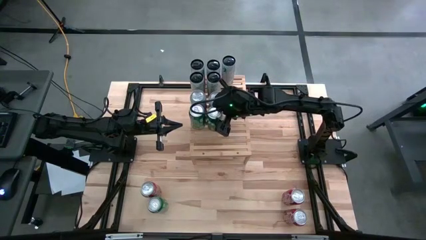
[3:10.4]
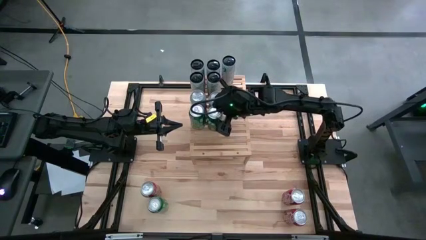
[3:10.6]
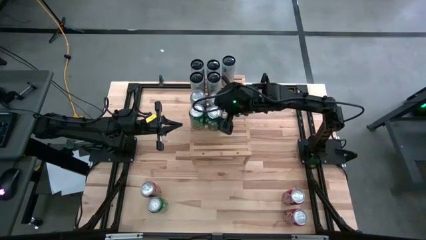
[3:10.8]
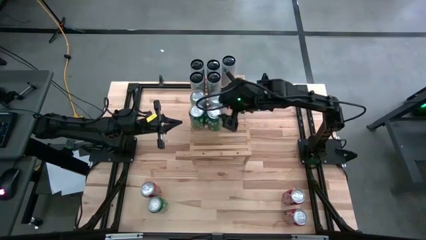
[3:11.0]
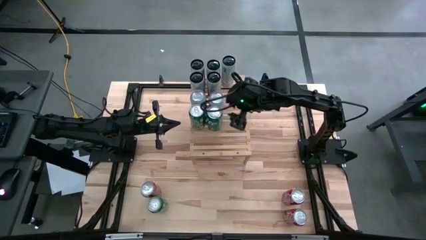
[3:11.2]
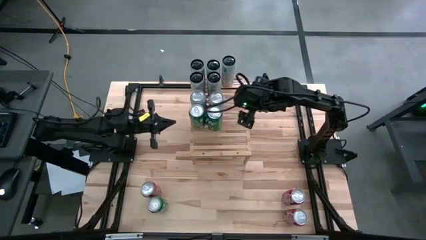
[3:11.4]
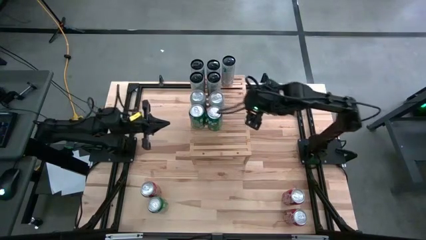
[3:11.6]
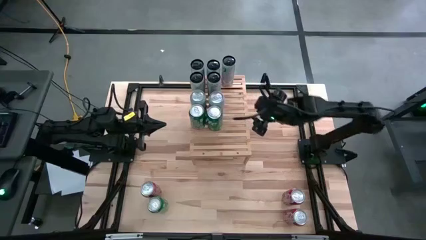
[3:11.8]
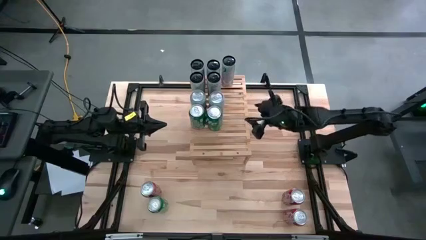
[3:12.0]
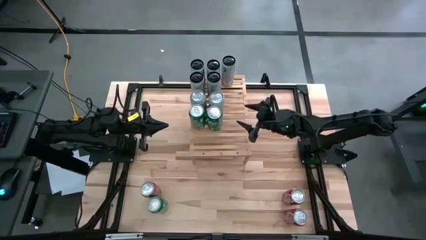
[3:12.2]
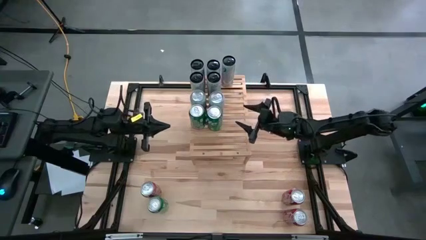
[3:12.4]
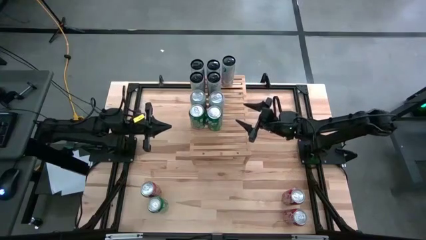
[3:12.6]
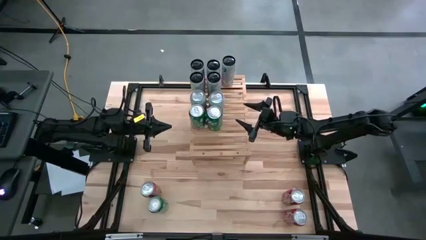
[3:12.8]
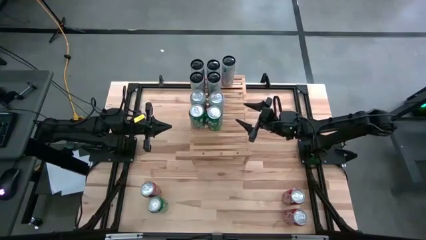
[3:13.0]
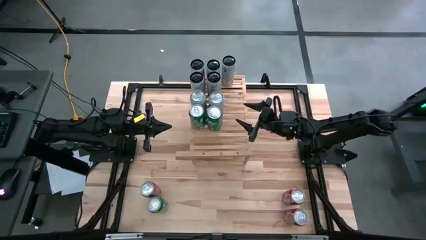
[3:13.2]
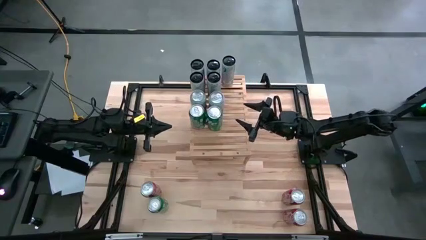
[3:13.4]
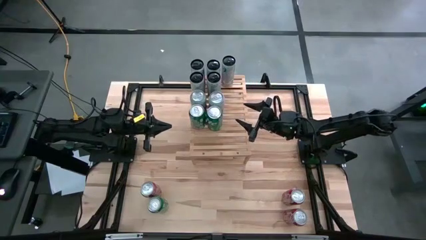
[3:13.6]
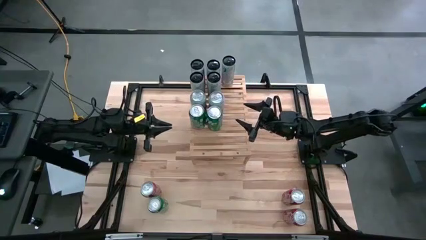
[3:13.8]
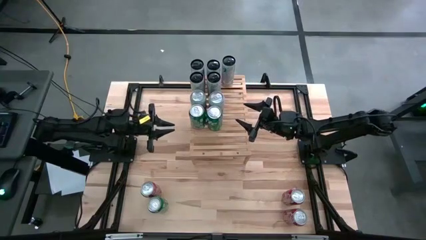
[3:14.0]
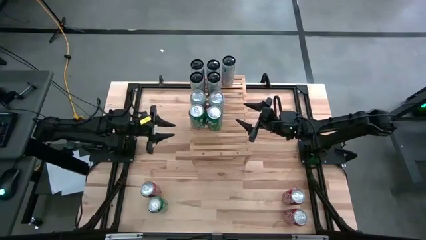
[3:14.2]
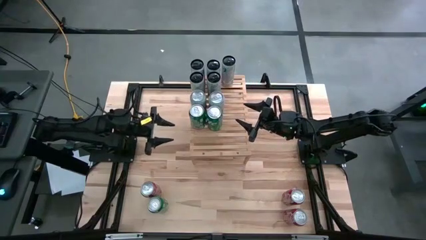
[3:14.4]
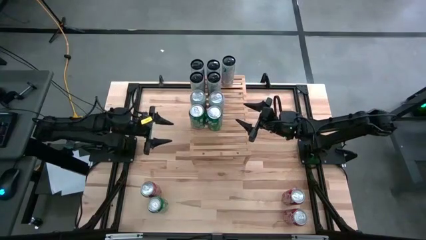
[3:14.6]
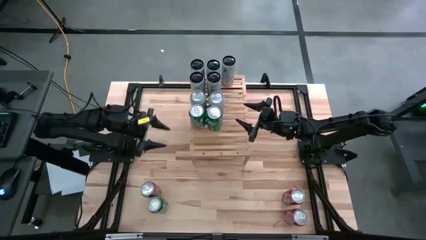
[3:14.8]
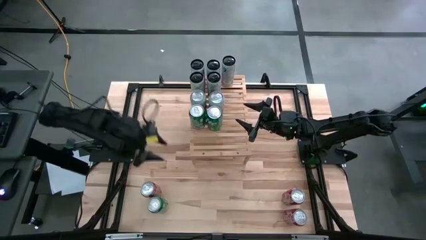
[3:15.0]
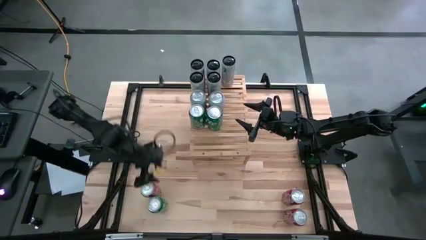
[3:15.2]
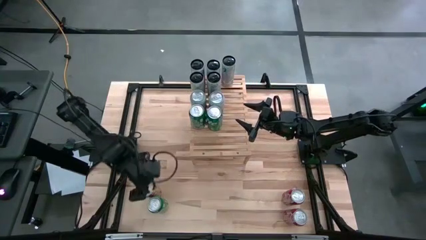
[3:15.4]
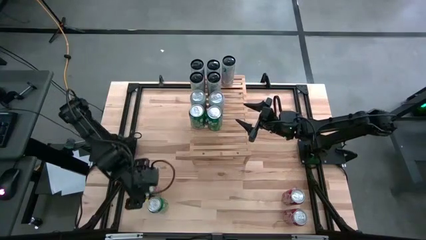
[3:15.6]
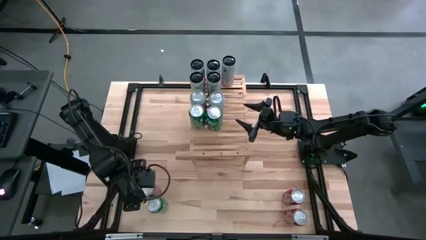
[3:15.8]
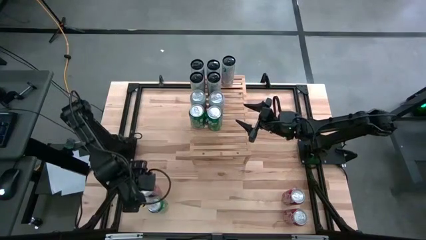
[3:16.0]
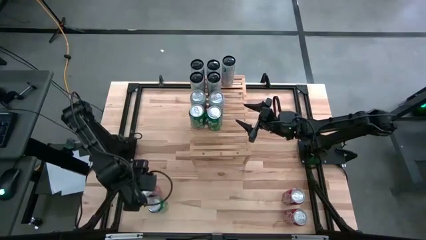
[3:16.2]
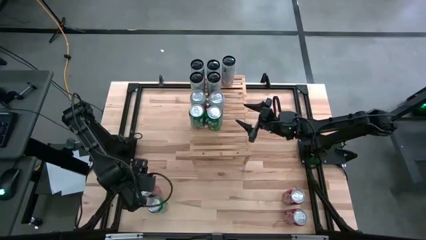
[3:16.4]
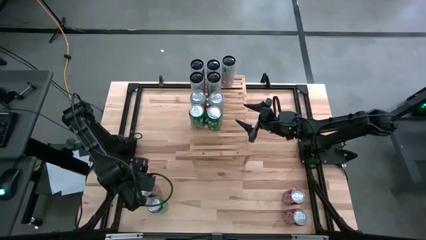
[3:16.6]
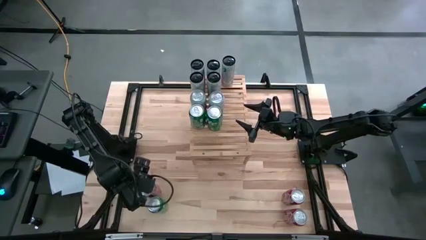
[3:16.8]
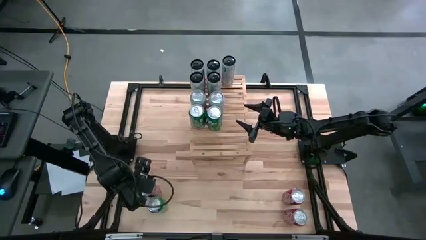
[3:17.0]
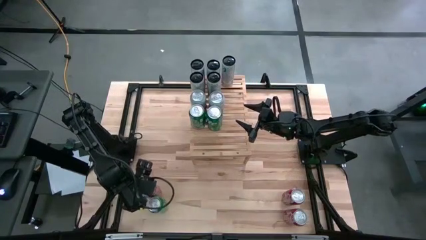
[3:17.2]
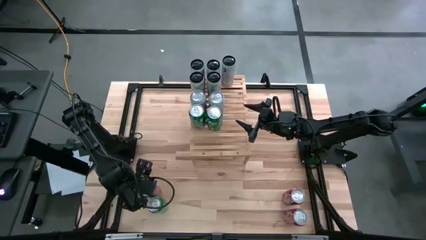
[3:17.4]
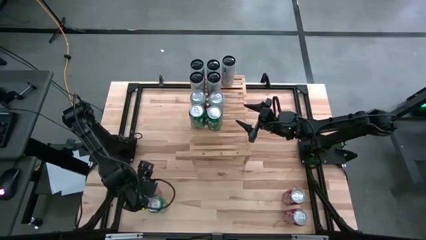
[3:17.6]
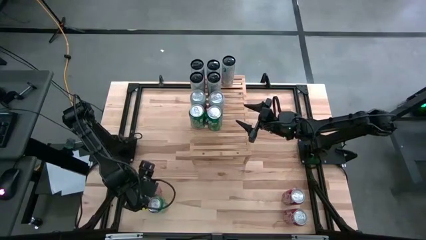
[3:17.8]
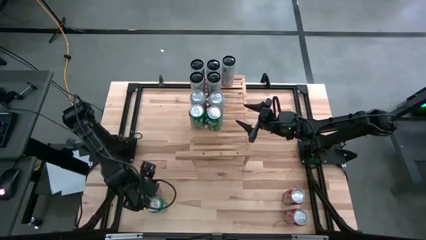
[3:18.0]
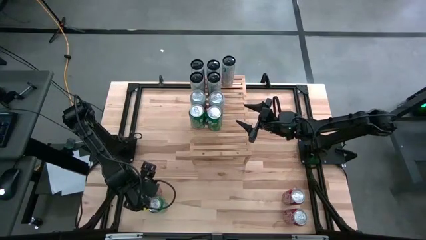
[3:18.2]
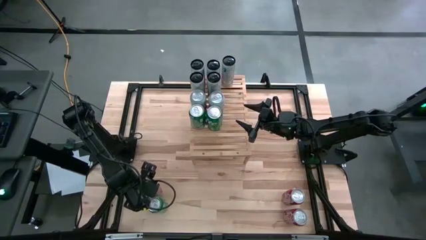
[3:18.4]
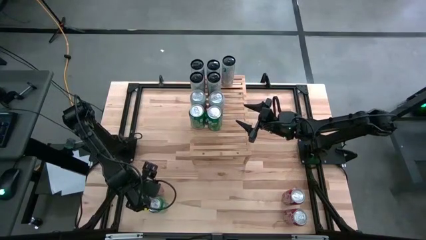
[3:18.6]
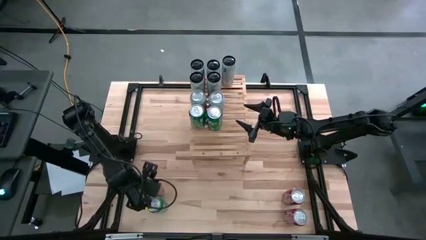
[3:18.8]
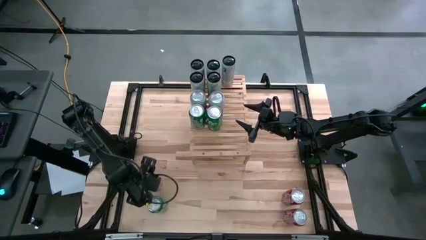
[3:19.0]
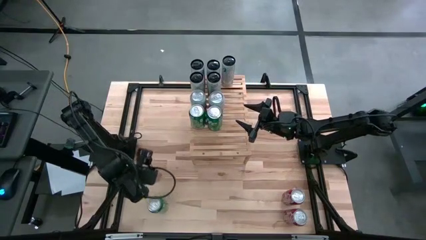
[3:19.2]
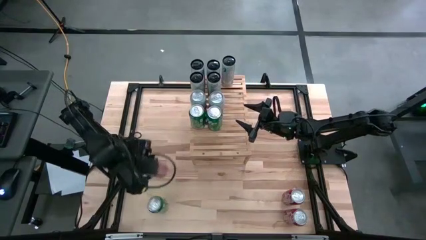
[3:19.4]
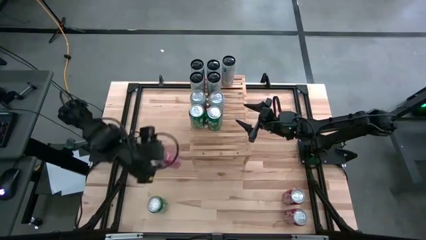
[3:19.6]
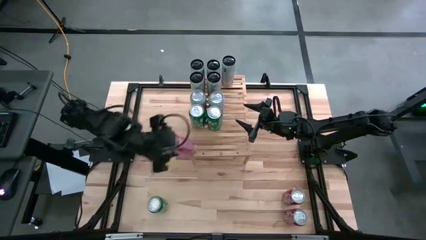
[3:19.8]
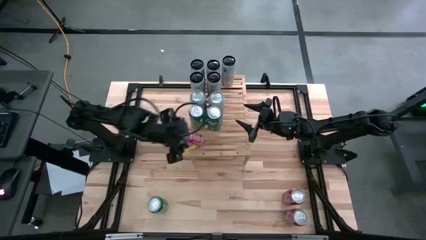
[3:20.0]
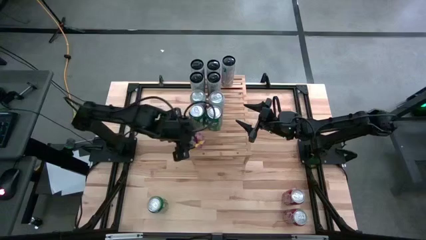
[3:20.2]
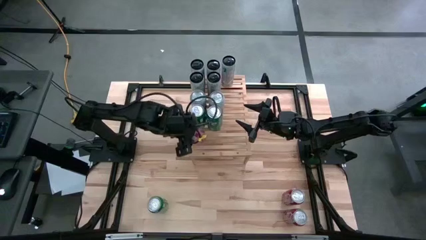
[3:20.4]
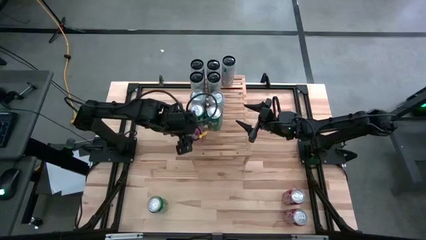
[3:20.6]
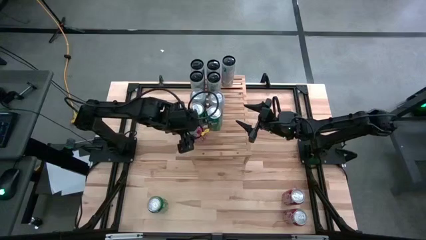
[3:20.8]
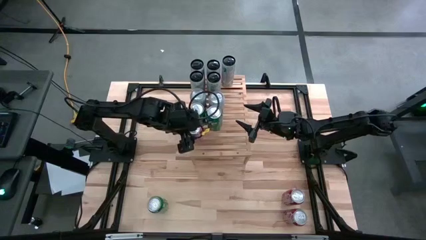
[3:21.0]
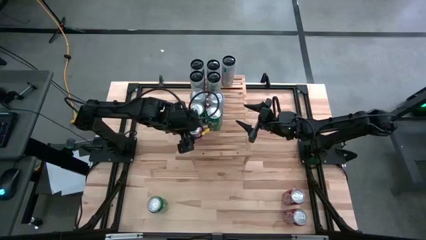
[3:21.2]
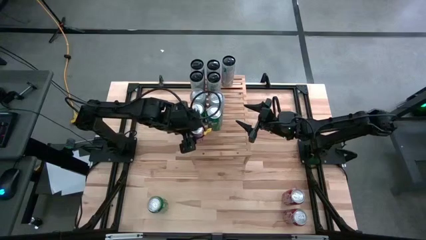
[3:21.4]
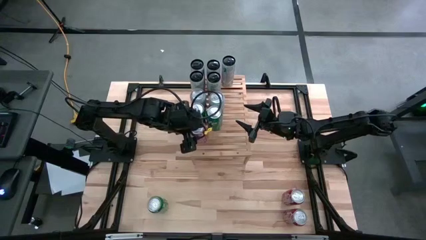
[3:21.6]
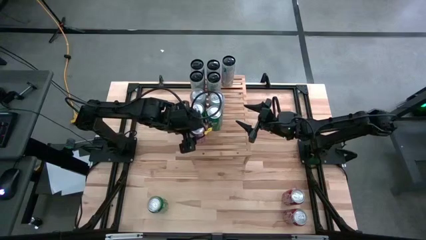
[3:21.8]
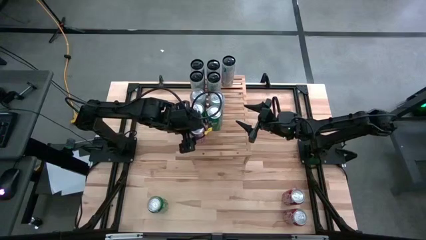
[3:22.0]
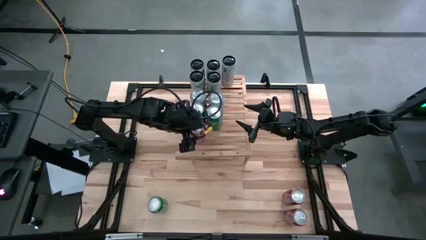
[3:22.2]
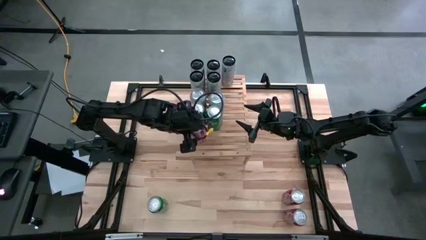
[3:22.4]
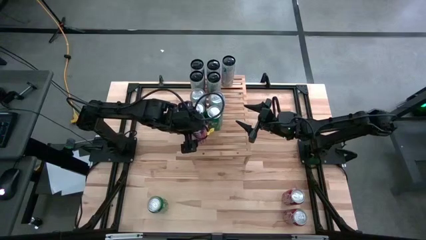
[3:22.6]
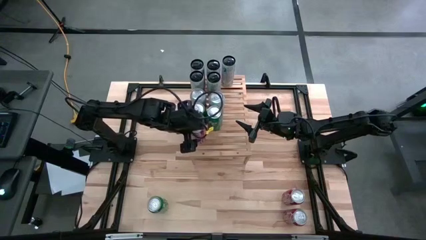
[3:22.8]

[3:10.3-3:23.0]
Task: Place canned beverage on shelf
Put the top left red soda can on the shelf

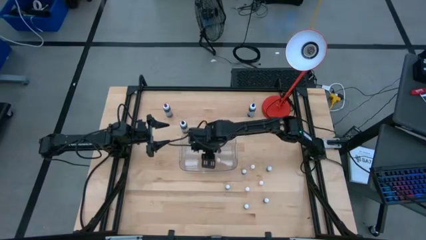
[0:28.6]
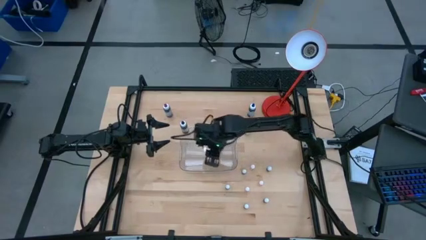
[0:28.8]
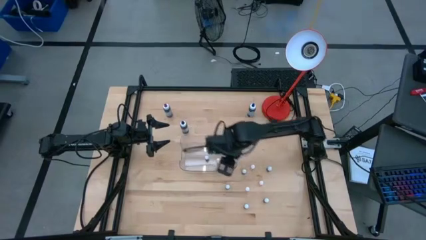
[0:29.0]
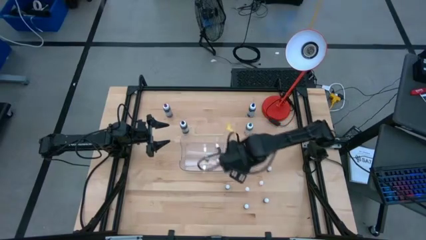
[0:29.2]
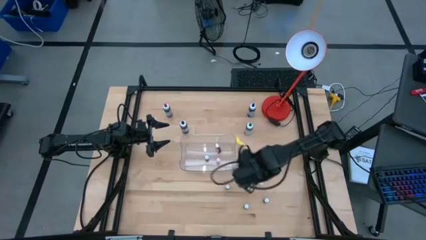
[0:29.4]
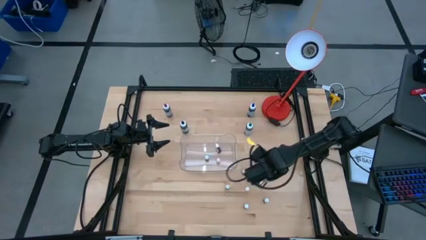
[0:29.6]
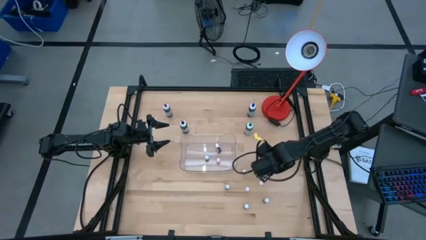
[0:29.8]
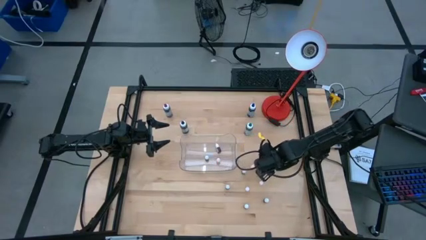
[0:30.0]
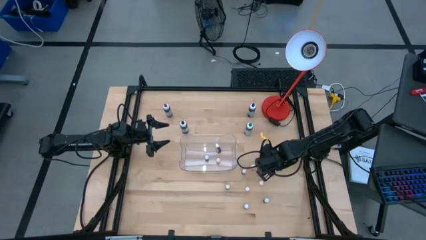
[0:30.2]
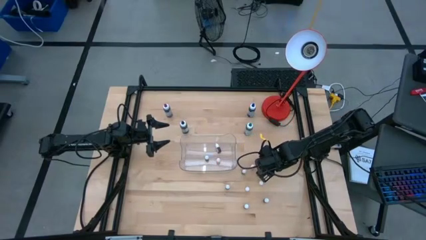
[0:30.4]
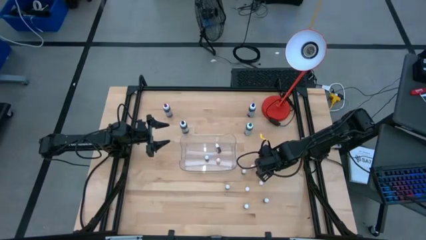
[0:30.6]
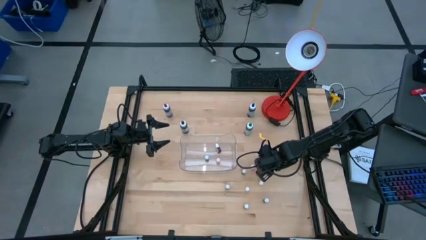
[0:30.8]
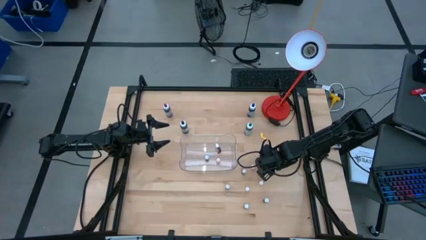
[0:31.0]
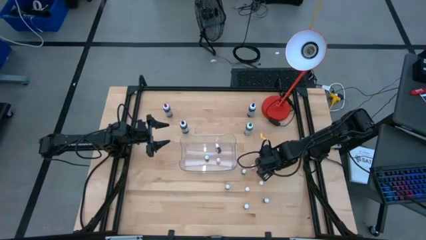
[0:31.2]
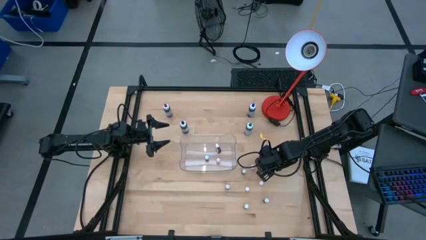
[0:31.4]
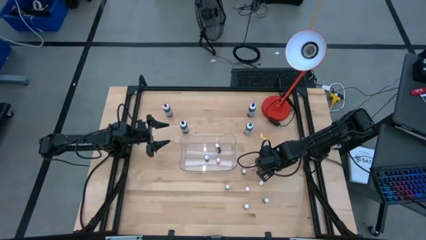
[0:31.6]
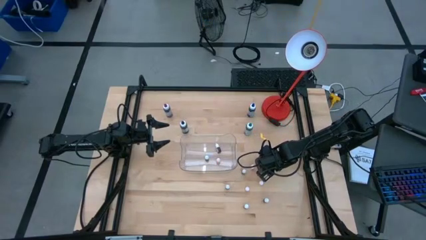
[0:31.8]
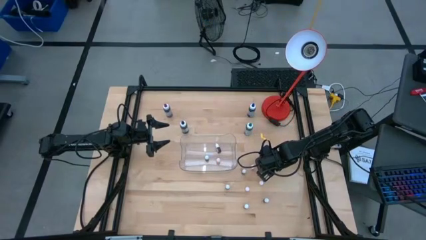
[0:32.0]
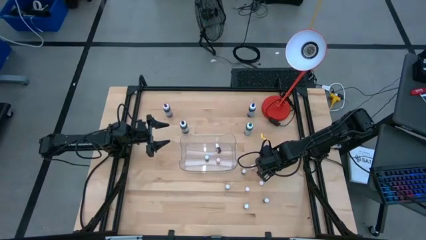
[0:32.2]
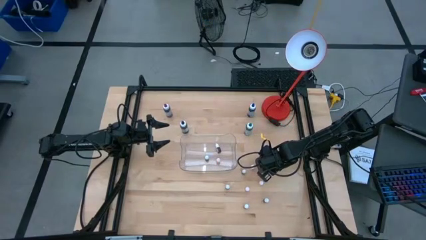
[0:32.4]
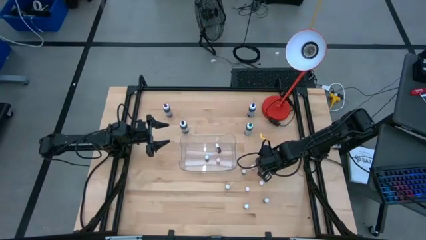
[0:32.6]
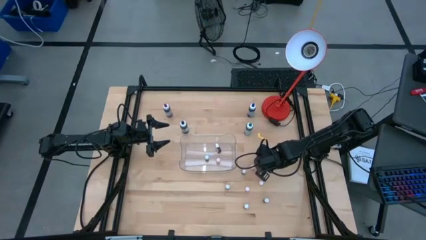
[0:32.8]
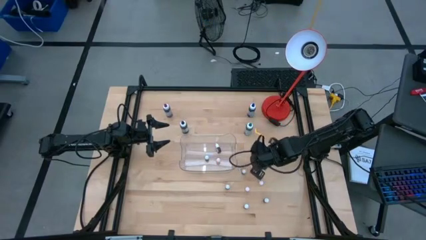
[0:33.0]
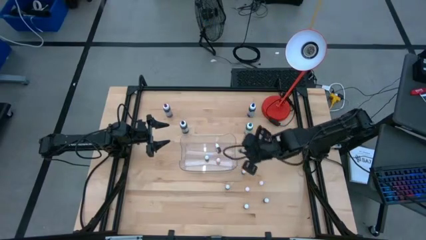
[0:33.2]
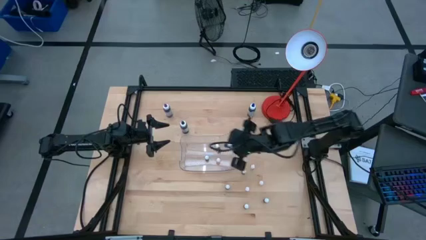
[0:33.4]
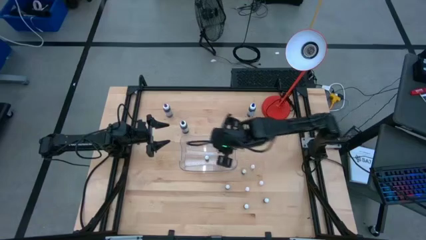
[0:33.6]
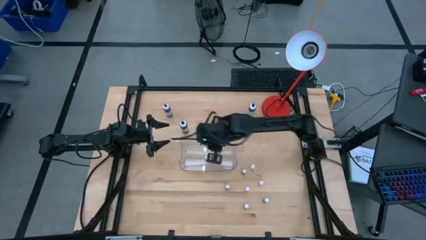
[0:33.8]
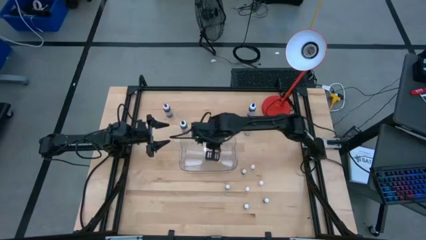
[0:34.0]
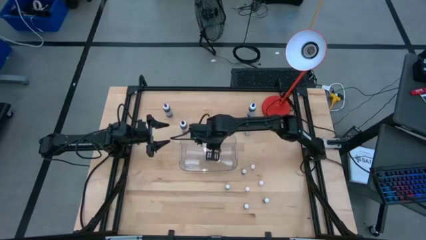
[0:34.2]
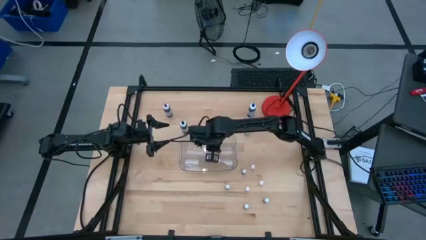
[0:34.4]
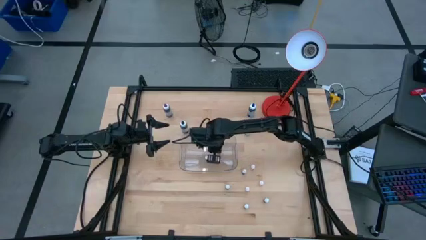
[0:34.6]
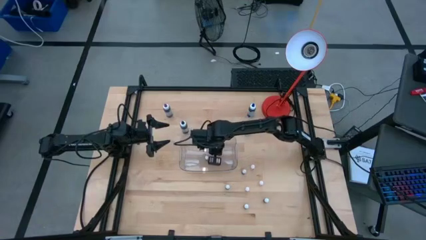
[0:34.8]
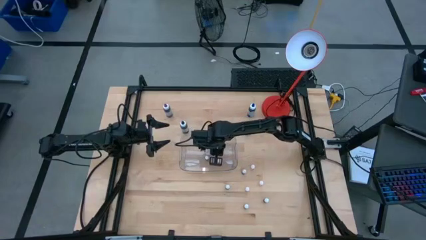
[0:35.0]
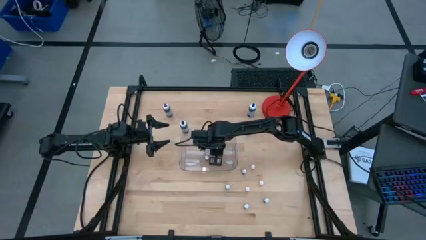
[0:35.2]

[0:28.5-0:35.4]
Task: Pick & Place food coloring
Put the small black food coloring bottle into the transparent bin
